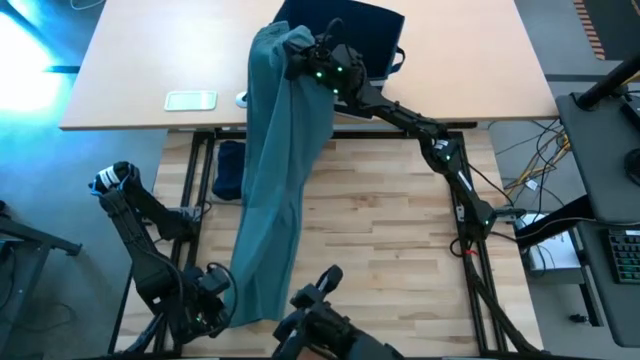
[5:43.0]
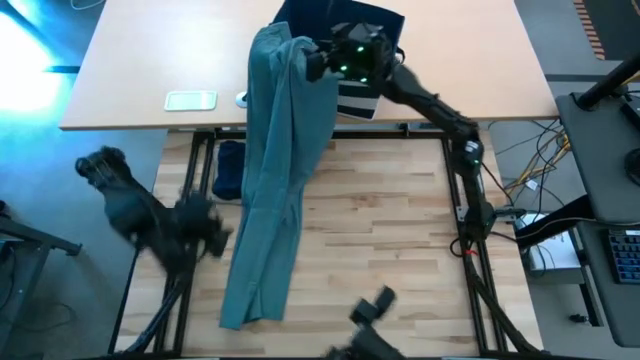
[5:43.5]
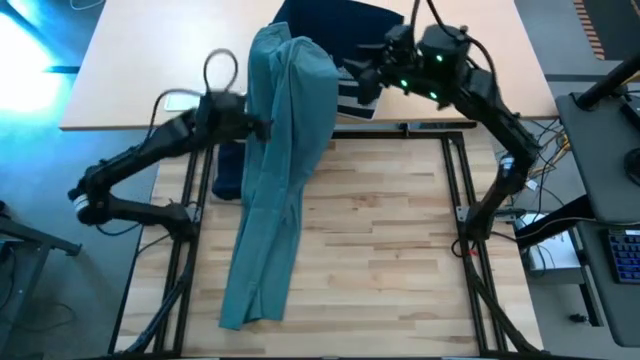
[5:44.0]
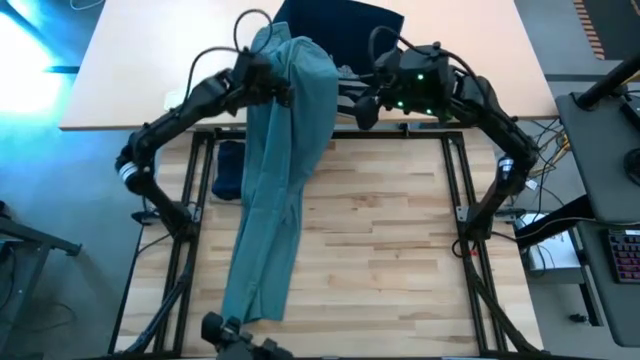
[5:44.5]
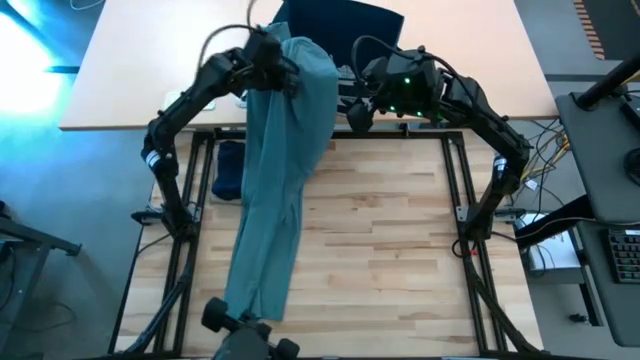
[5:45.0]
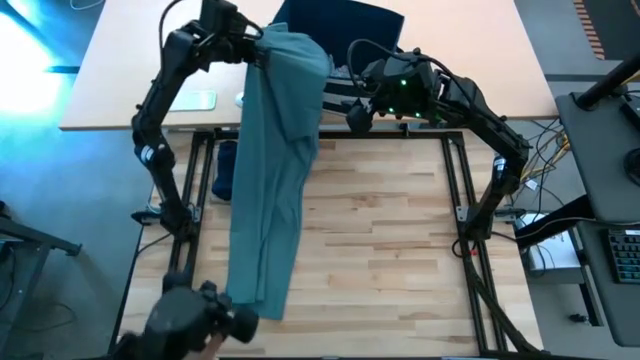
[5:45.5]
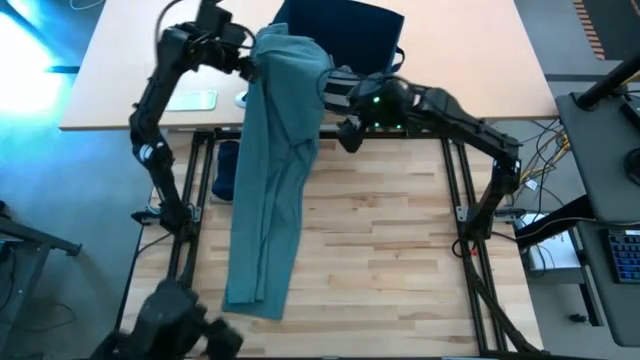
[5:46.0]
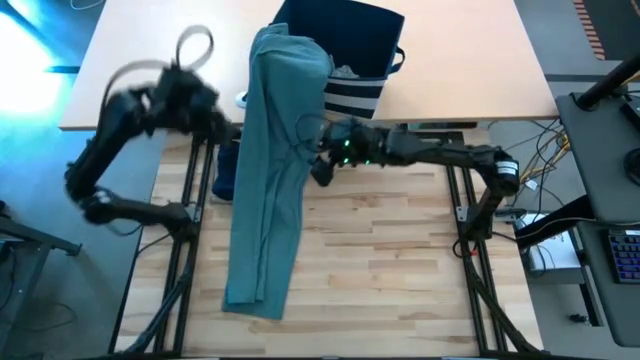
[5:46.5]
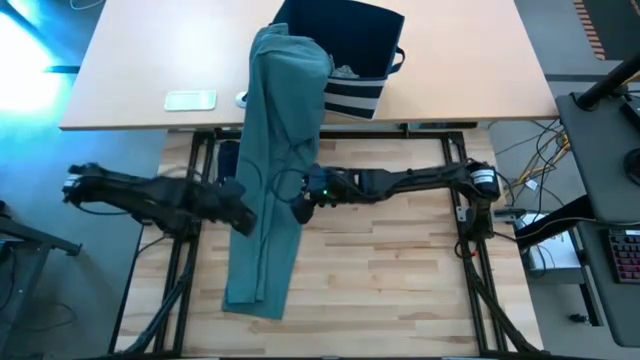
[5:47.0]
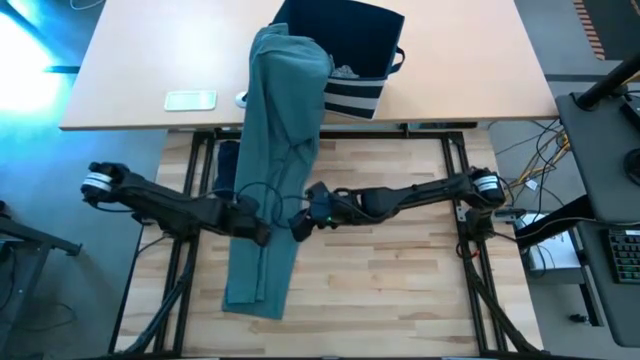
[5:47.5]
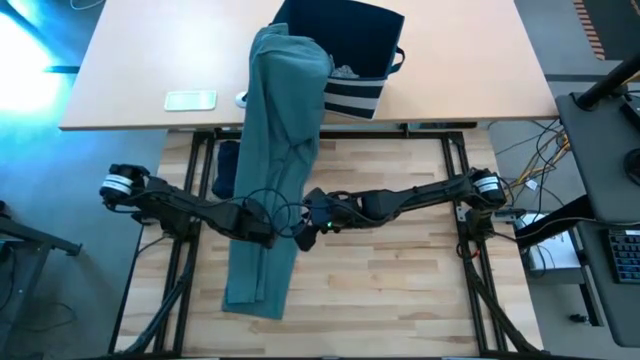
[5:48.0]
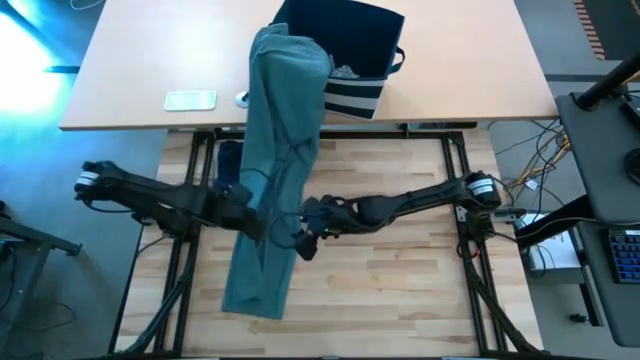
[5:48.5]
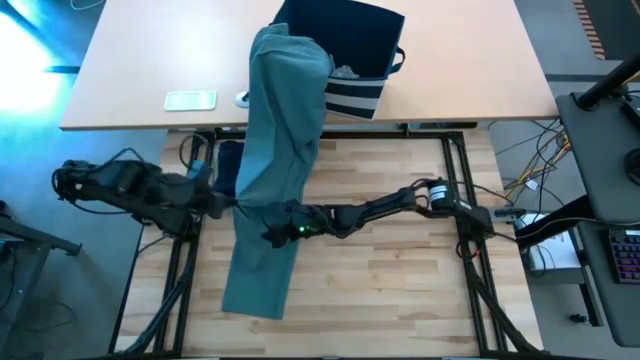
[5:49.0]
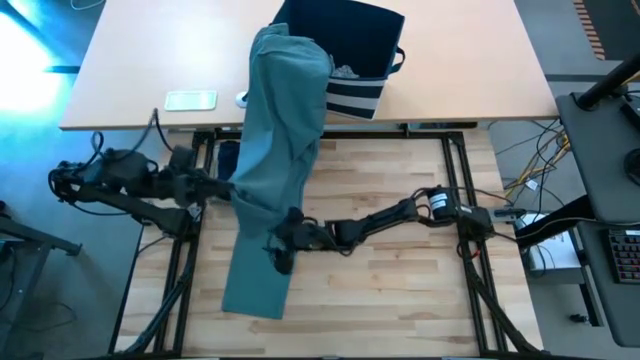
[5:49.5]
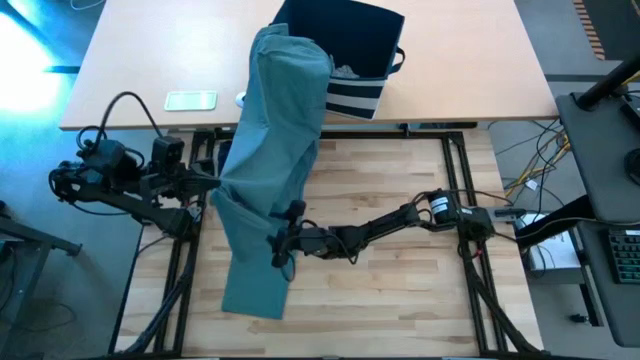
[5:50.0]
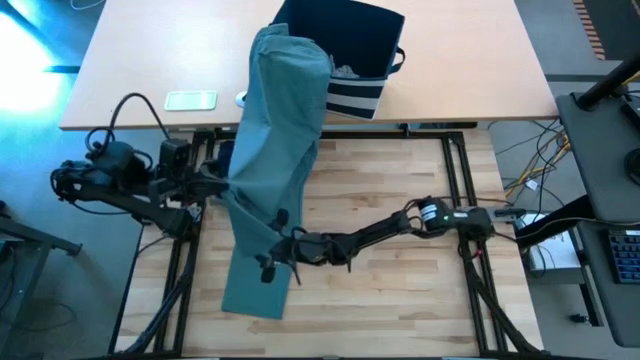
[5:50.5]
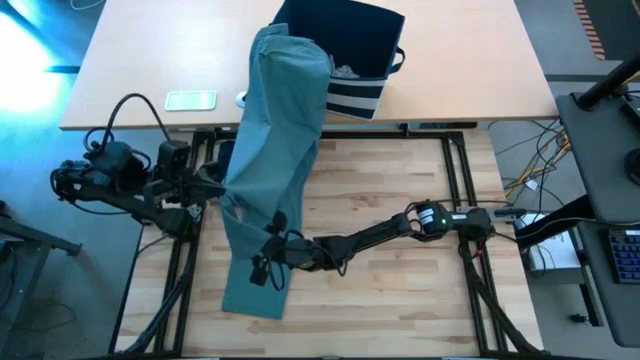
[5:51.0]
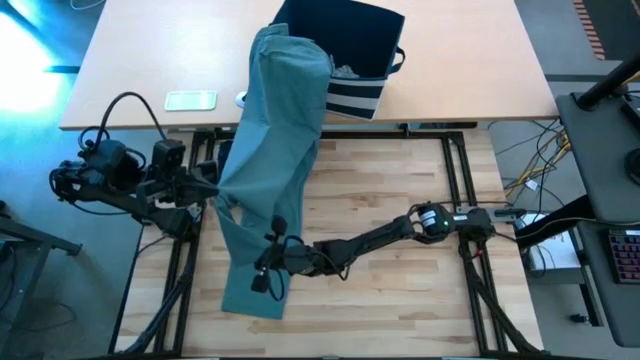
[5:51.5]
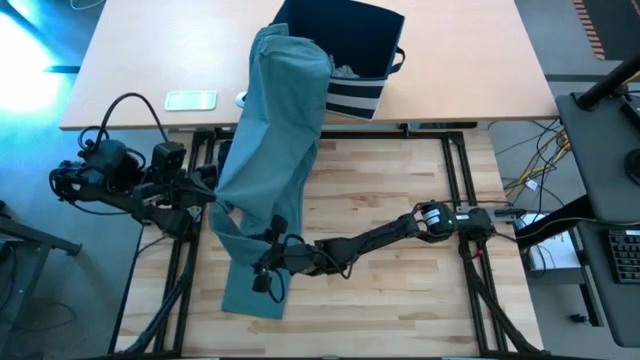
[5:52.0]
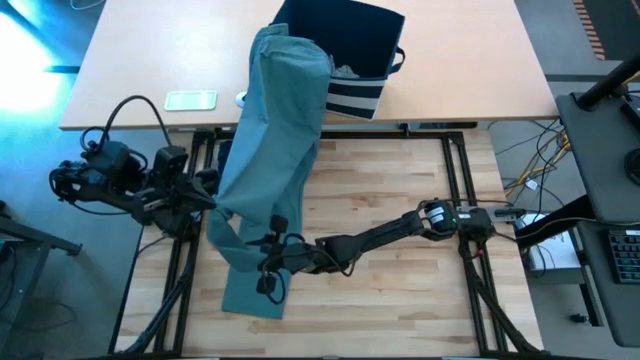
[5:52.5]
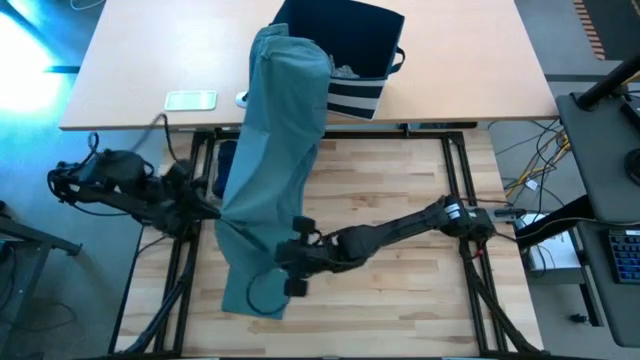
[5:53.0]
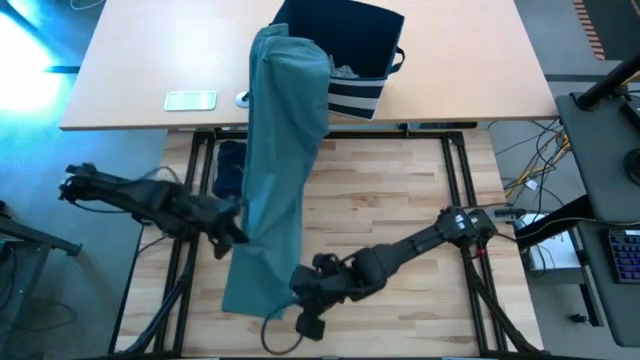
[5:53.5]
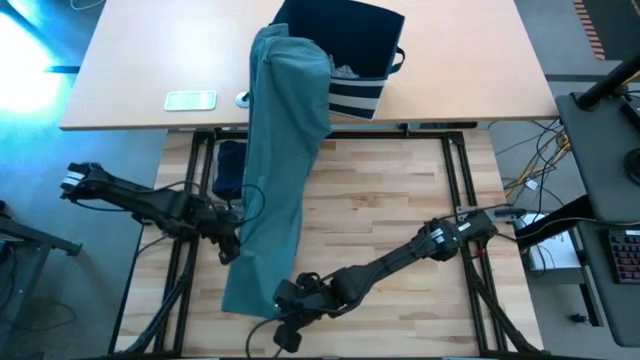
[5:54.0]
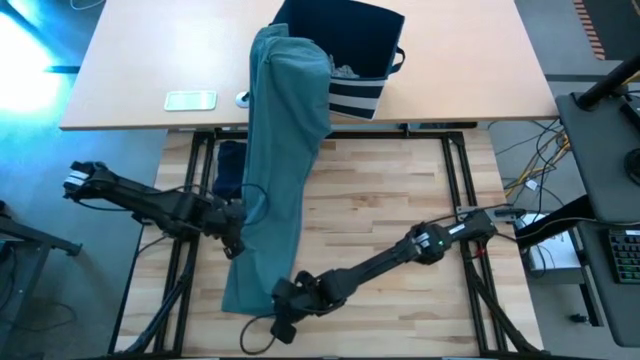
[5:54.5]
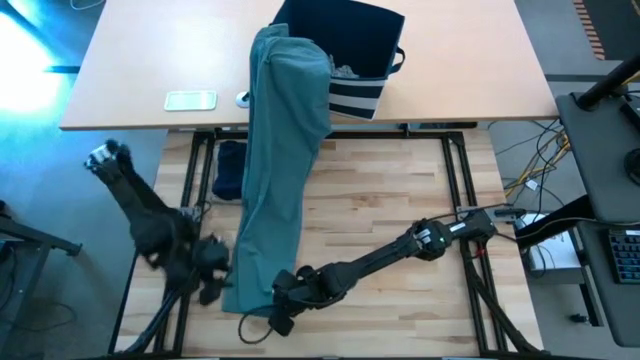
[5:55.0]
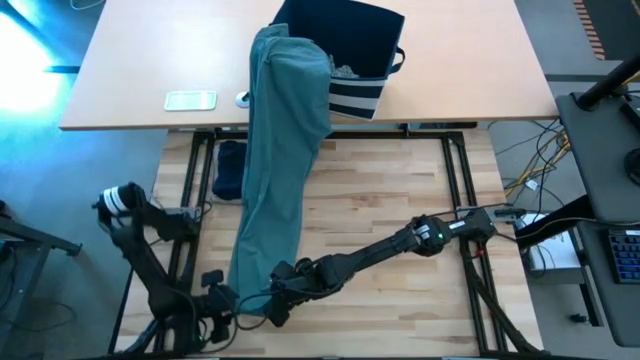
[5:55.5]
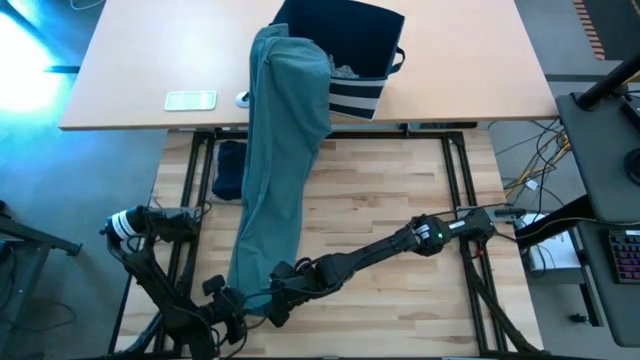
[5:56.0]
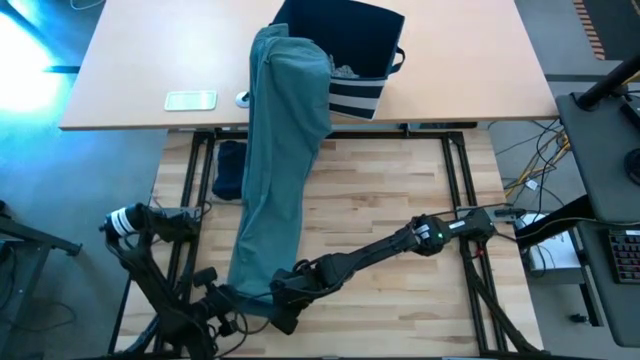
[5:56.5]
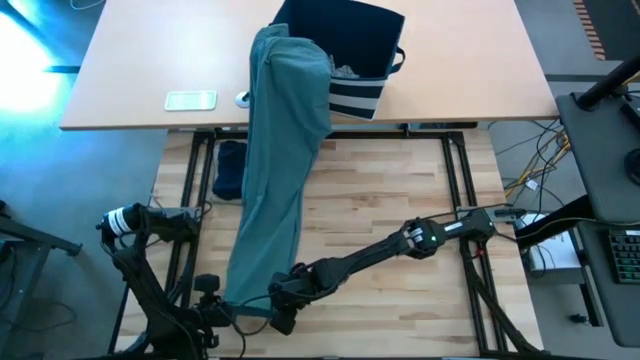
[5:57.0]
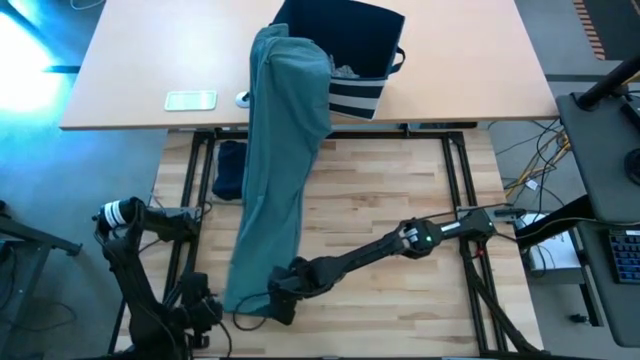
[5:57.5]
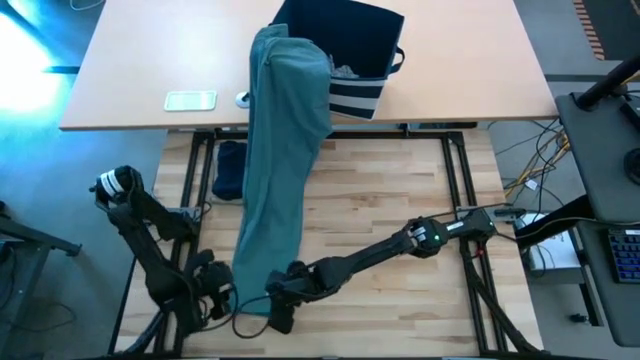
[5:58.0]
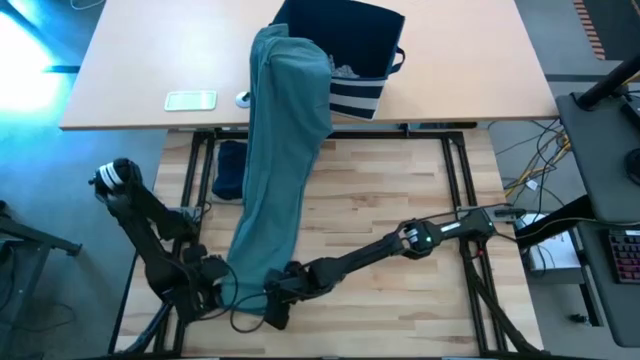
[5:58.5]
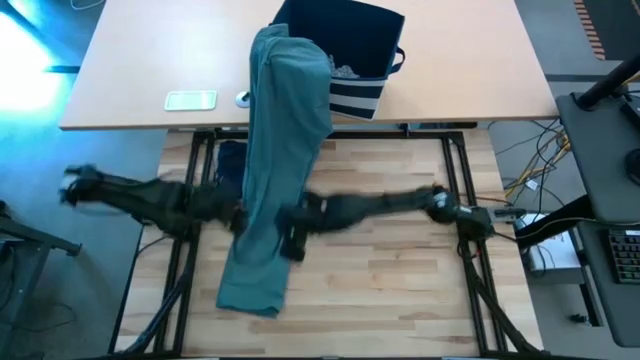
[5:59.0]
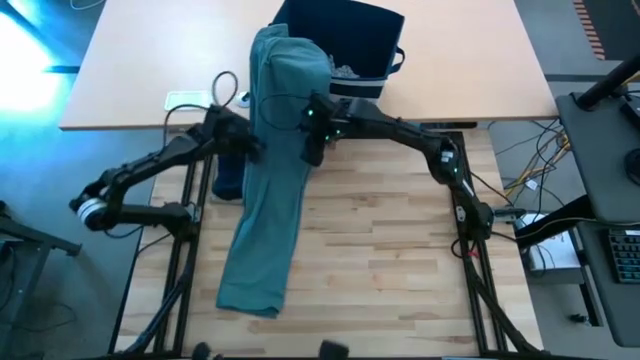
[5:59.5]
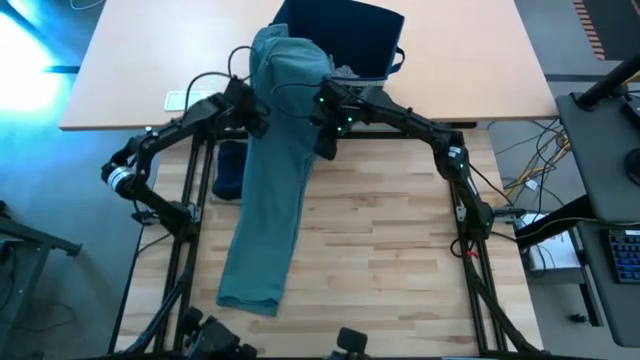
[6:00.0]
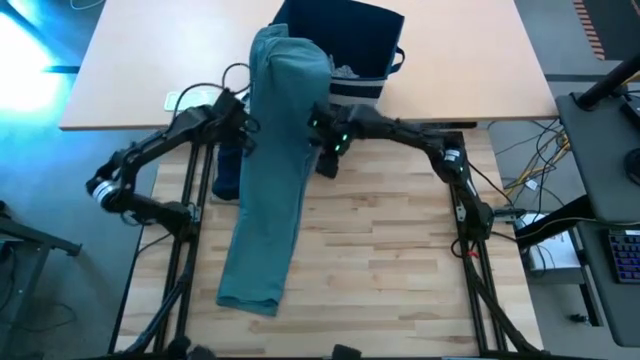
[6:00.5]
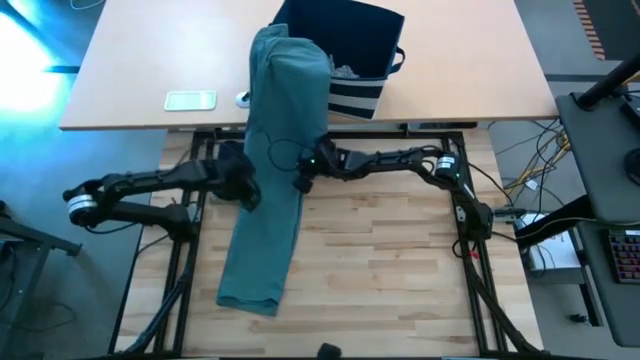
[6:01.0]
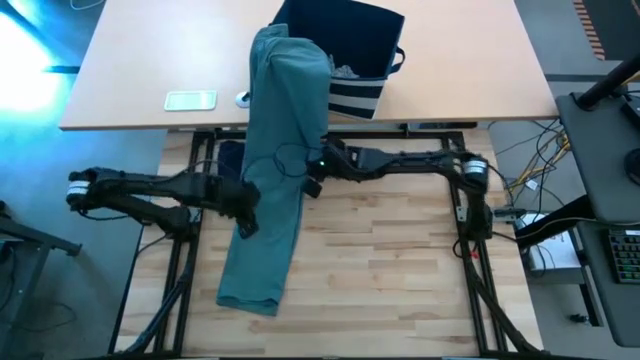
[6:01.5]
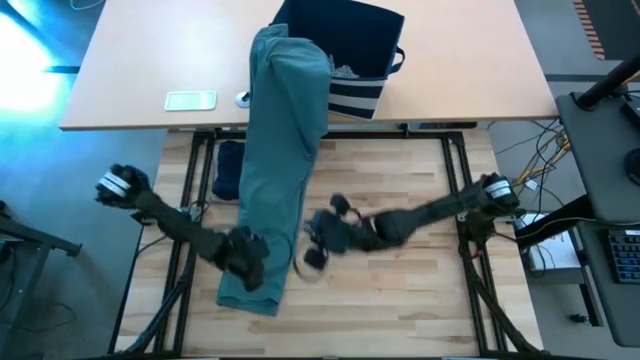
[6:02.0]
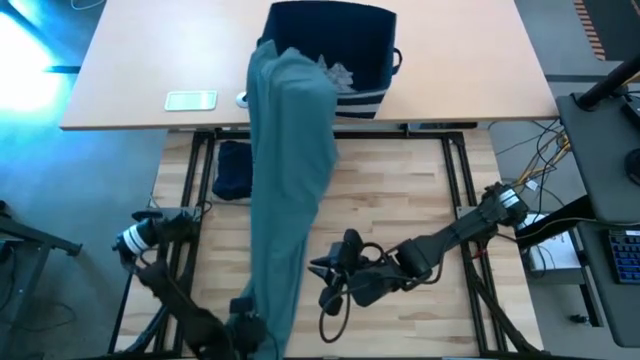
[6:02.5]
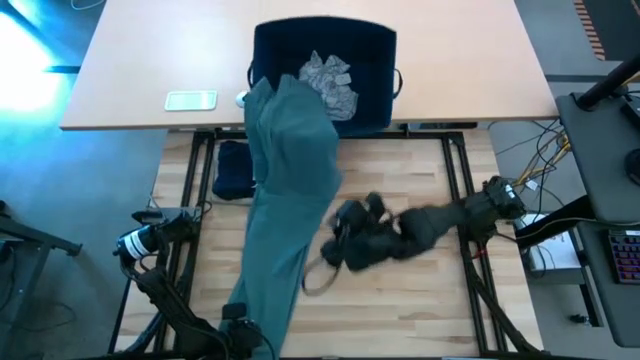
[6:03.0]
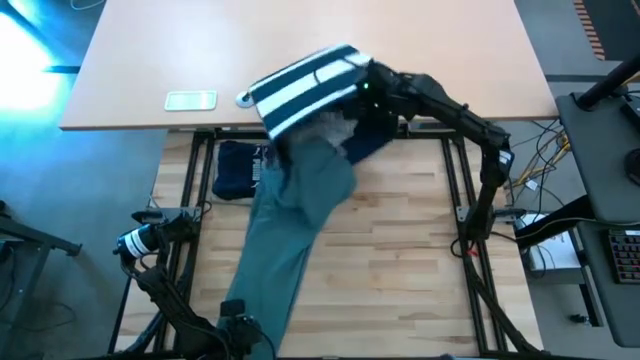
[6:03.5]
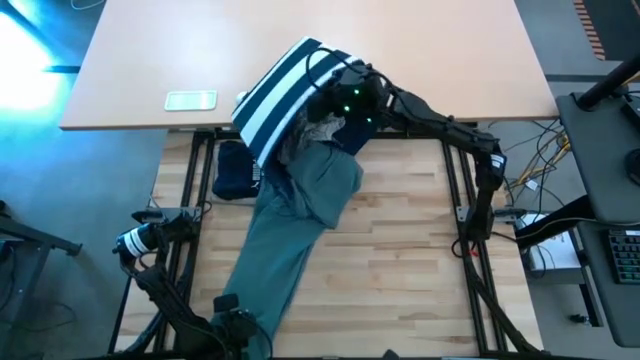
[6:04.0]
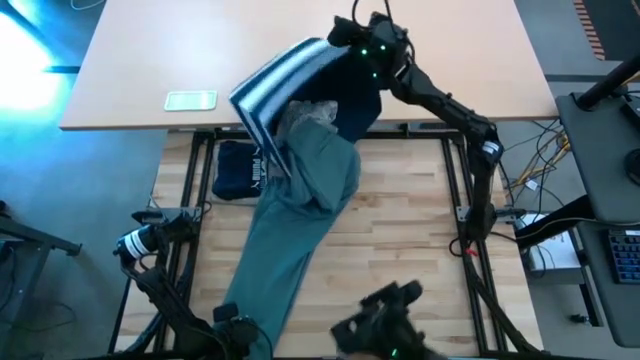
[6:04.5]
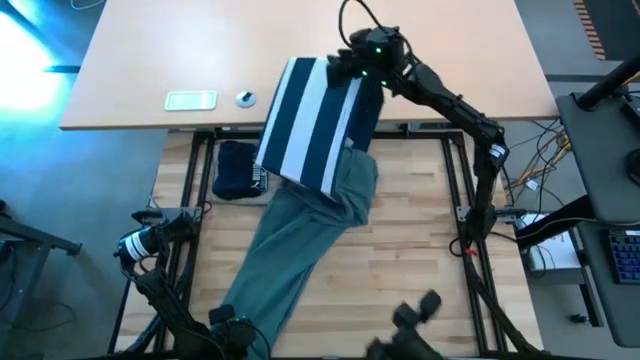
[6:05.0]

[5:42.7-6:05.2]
Task: Fold Laundry from Bin
Fold the gray pants
